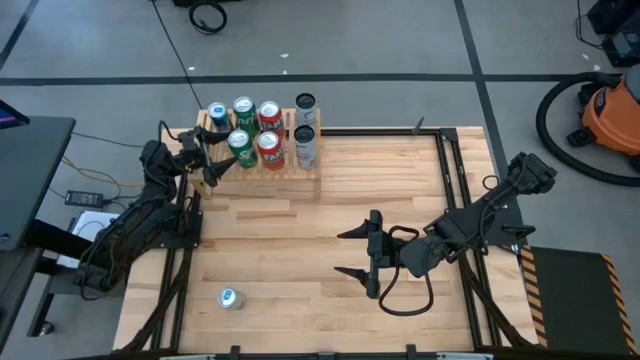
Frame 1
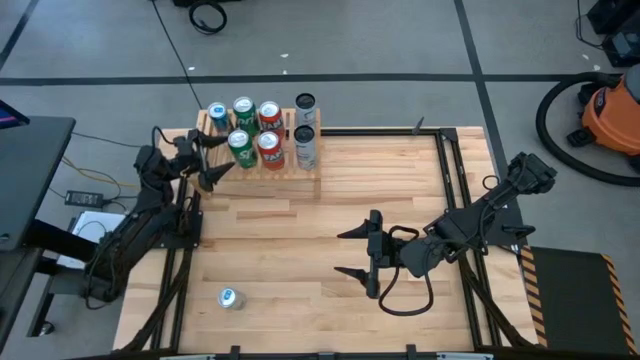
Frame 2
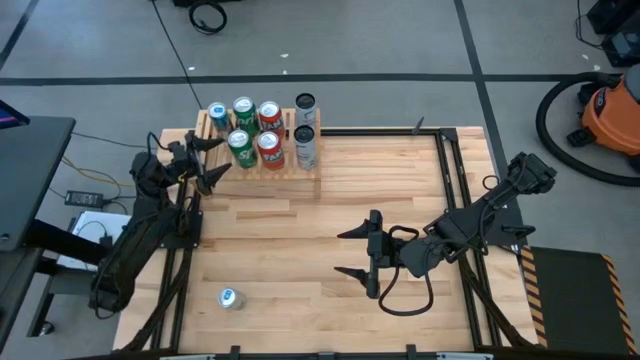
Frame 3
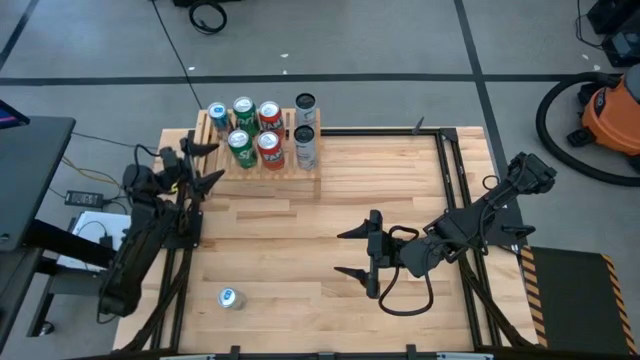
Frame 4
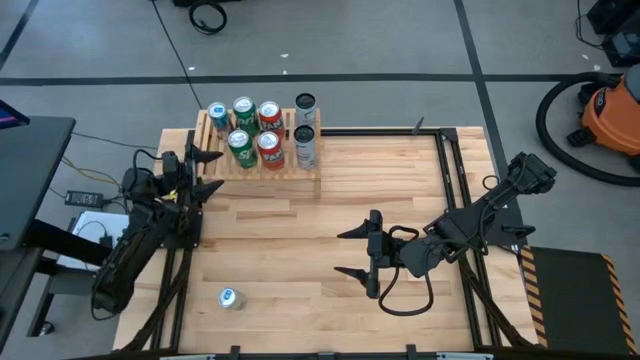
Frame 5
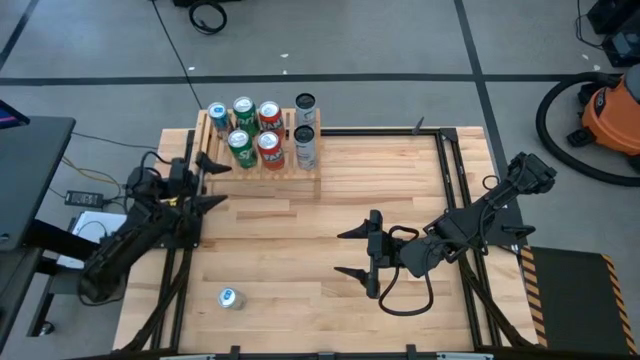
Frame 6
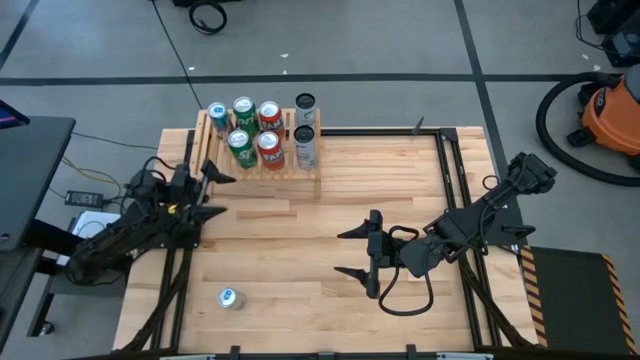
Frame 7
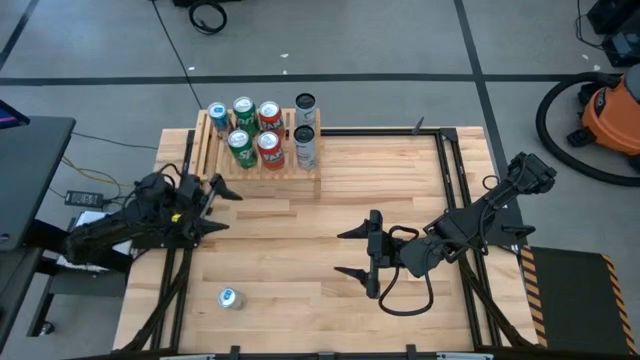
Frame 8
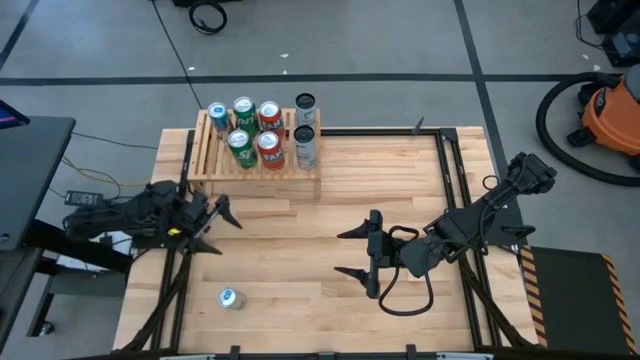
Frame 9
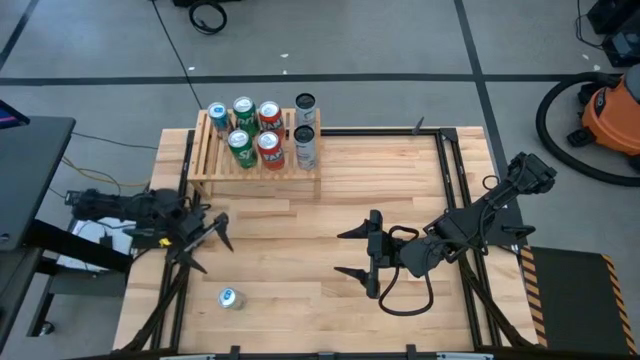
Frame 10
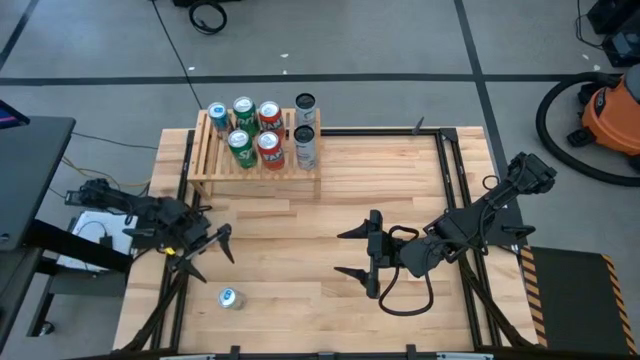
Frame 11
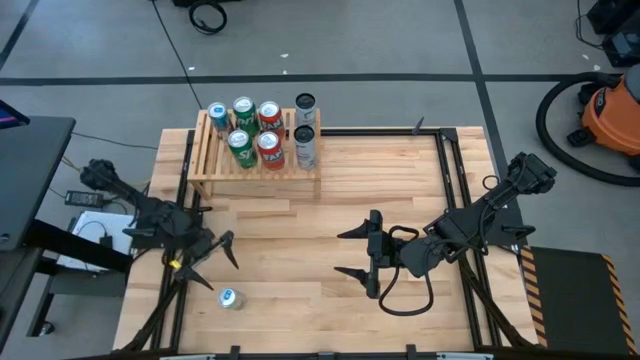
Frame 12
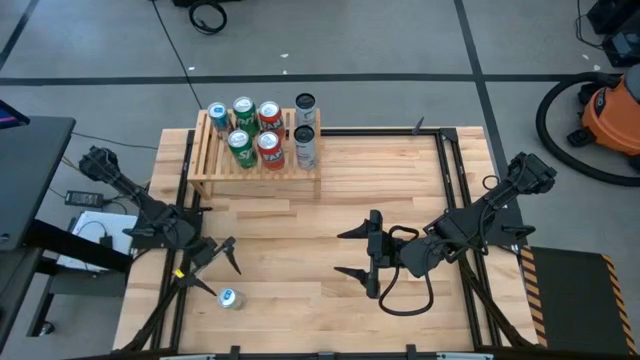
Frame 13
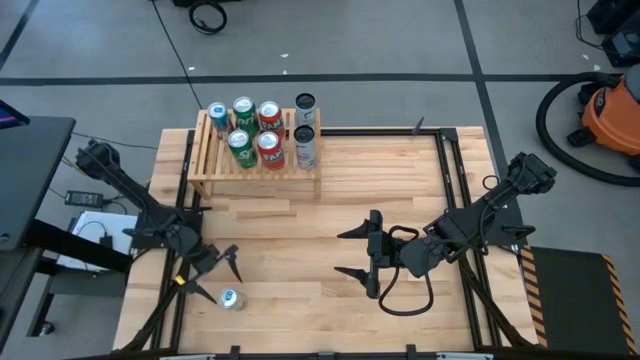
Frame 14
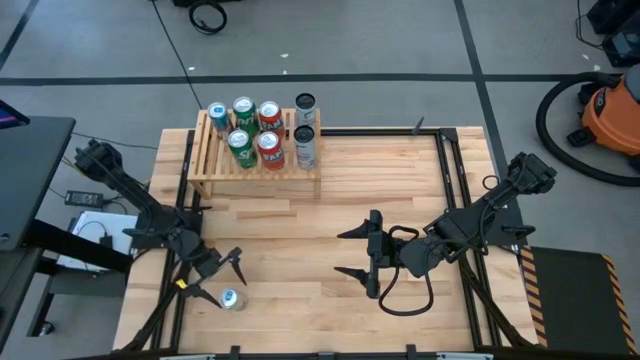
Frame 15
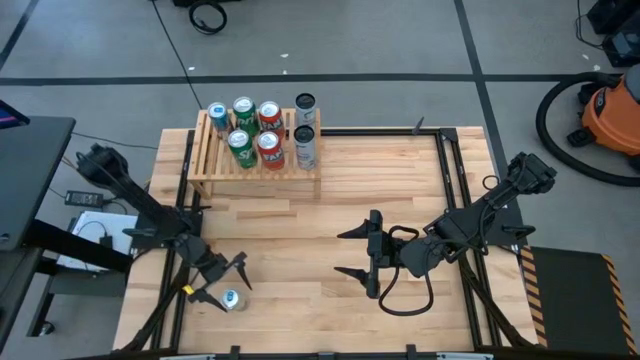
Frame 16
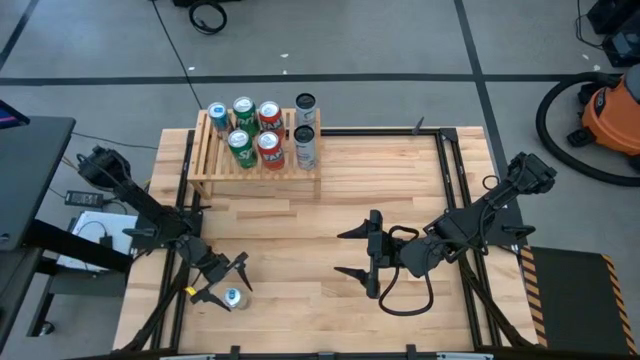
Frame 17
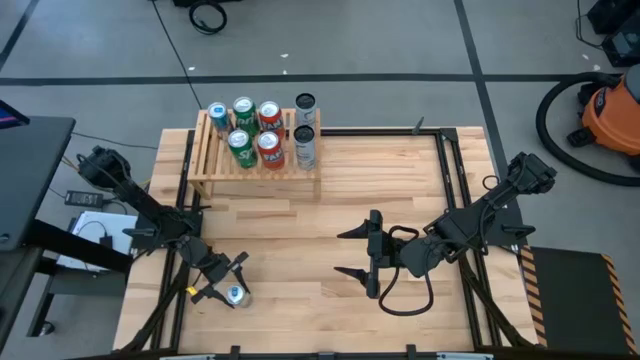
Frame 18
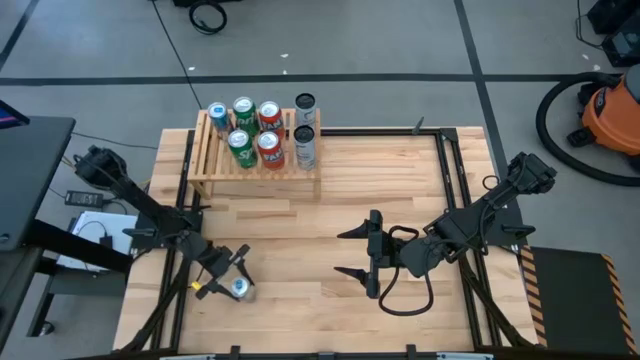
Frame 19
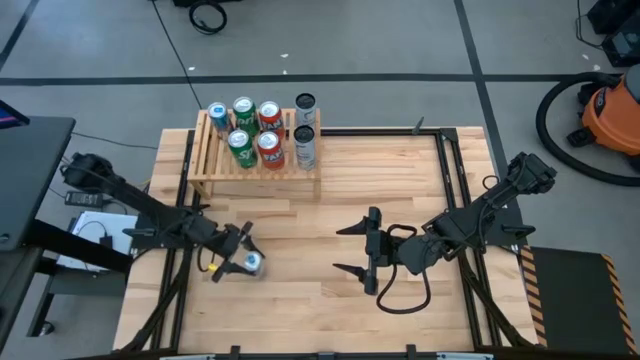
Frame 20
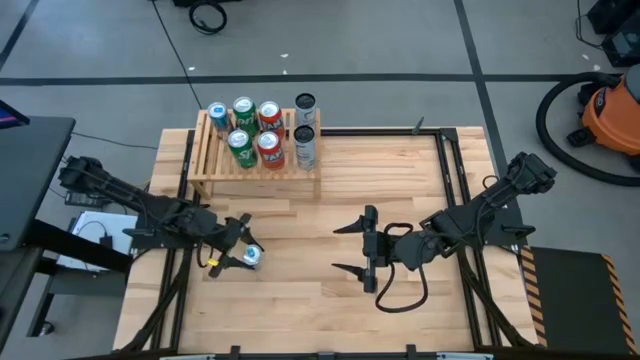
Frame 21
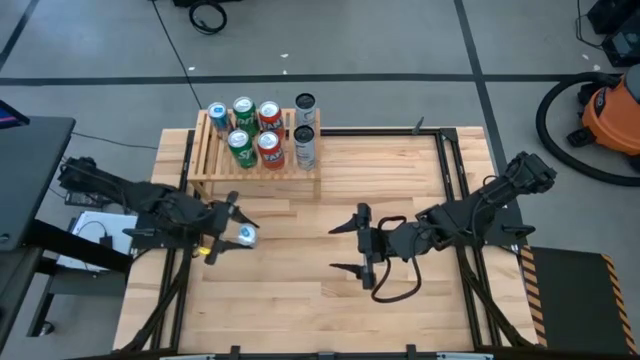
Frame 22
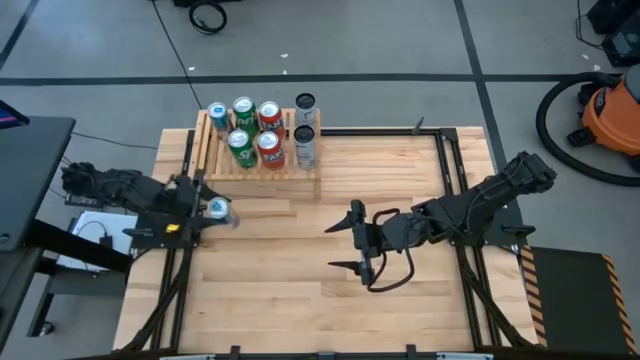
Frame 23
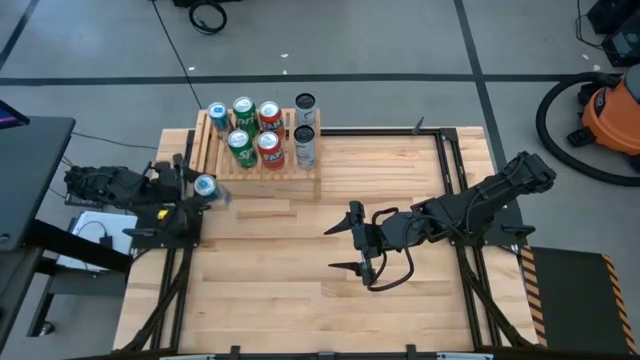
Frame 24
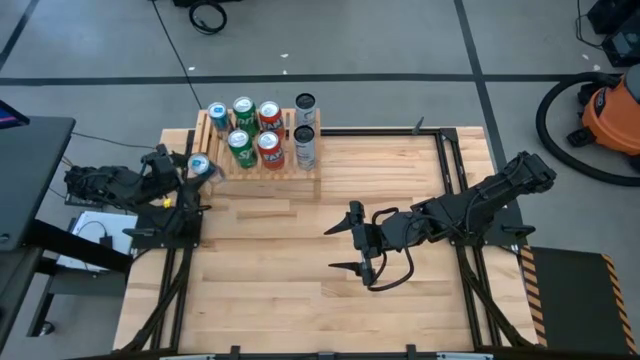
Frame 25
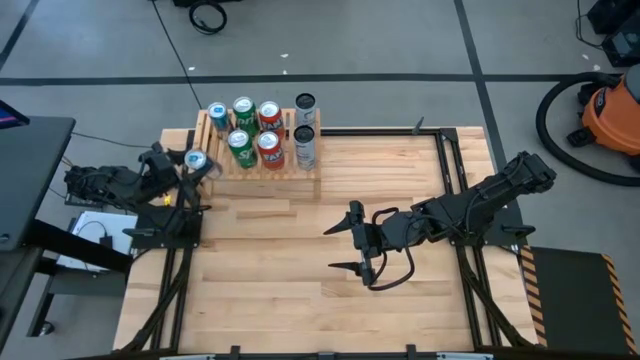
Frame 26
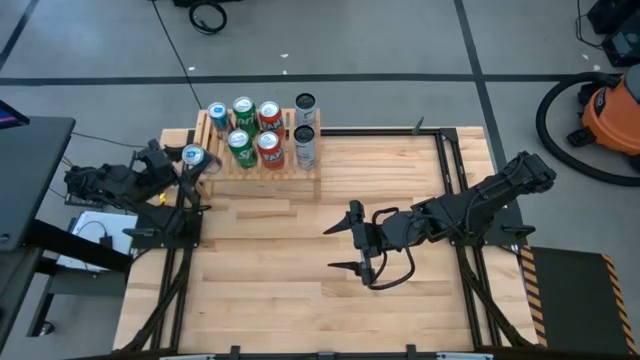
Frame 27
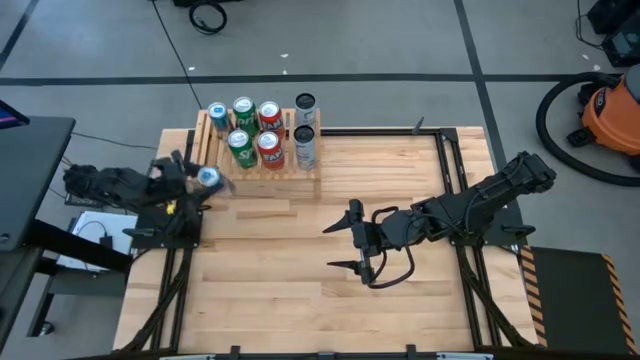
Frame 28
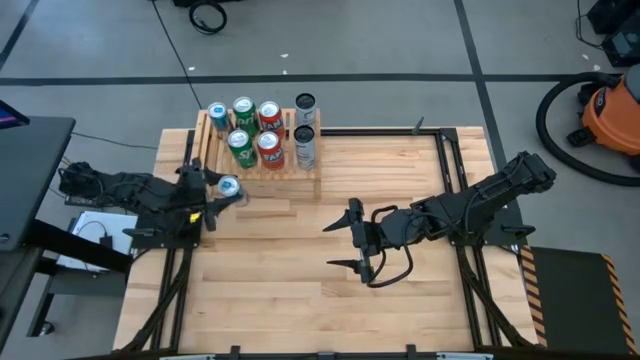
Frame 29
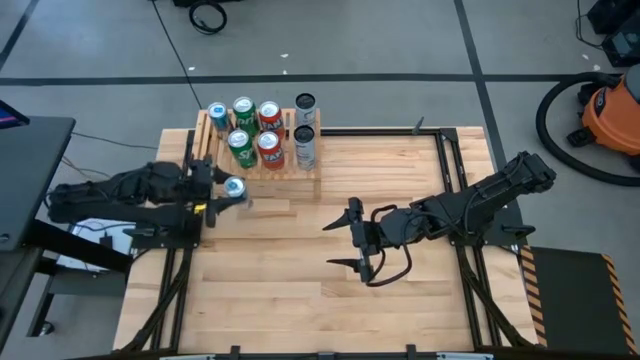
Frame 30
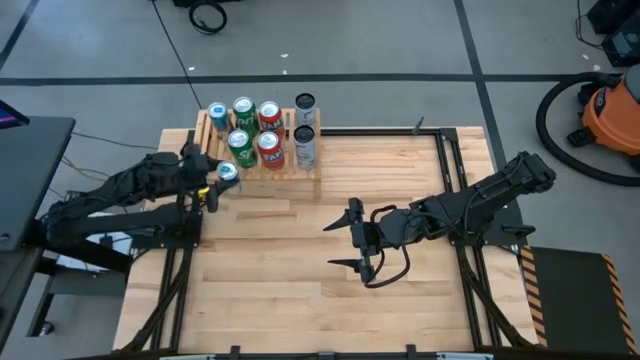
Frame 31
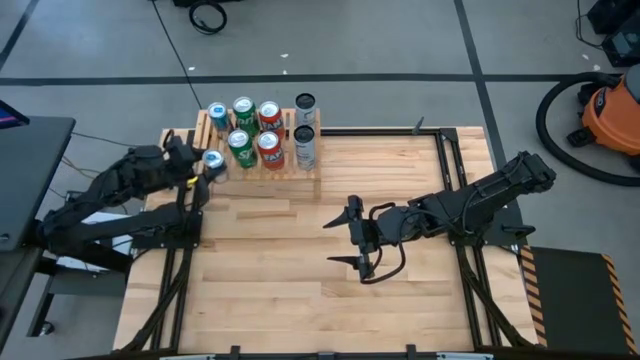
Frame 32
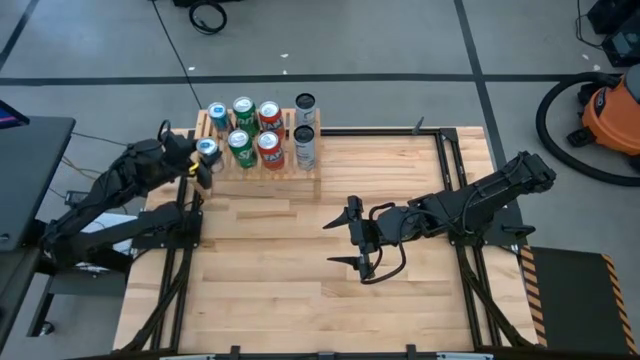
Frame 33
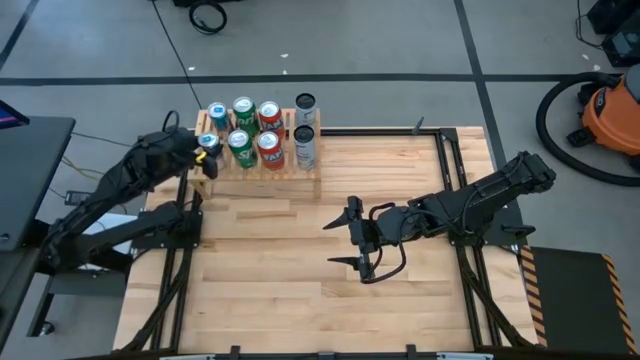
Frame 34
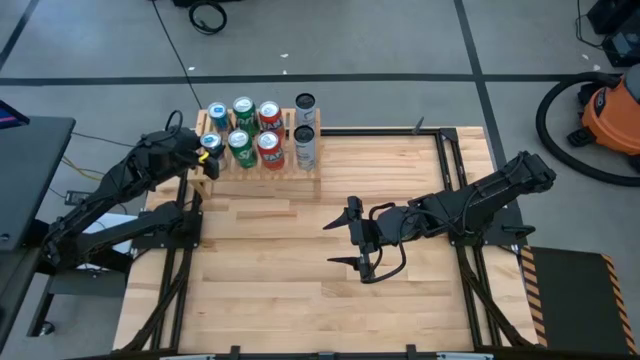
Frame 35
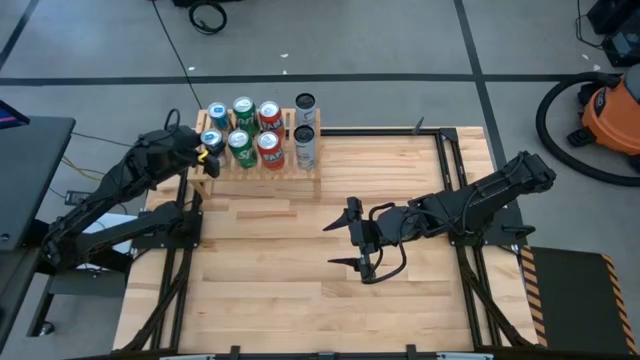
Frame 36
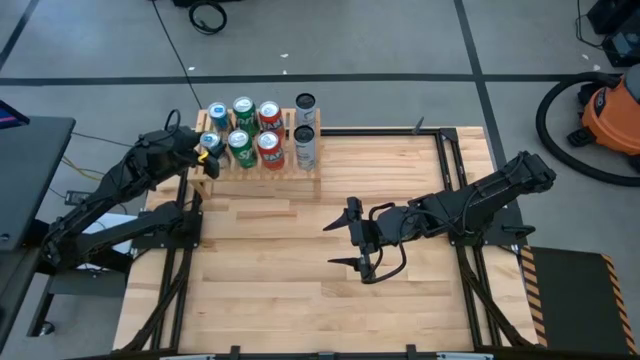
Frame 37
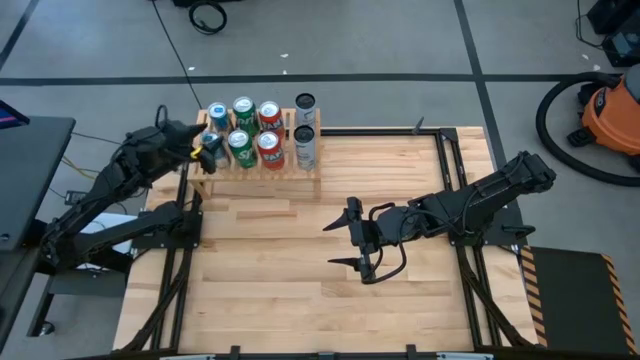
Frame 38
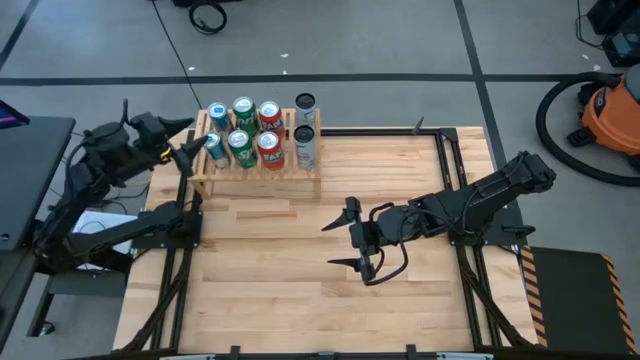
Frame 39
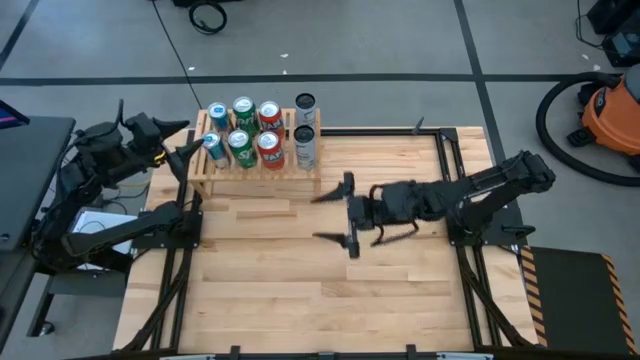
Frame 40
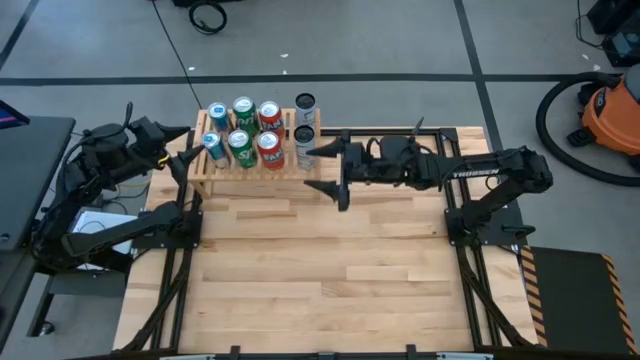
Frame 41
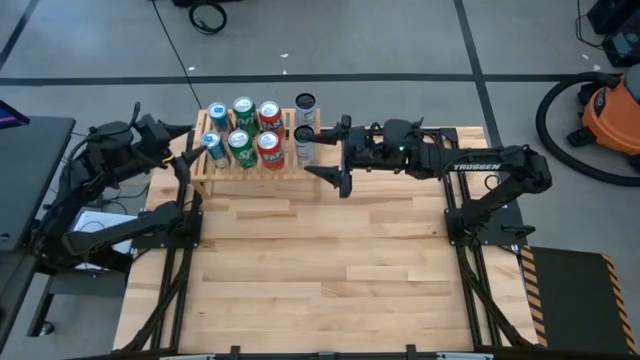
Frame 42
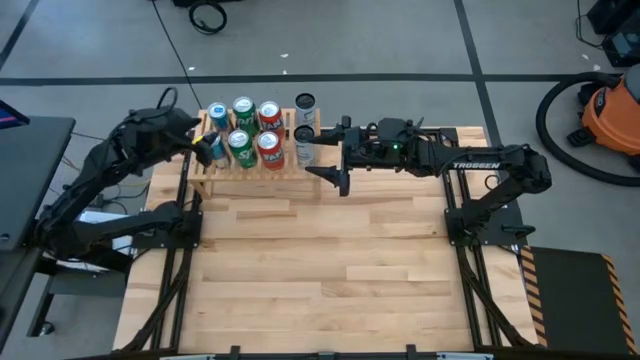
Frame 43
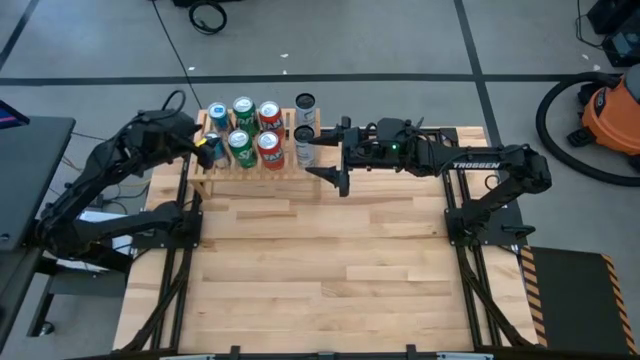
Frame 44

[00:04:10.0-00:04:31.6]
Task: Place canned beverage on shelf
Put the blue soda can on the shelf
